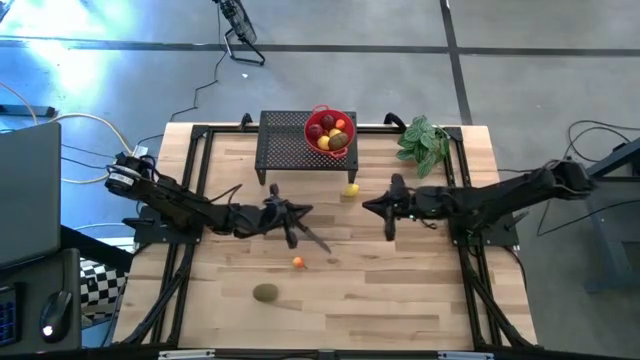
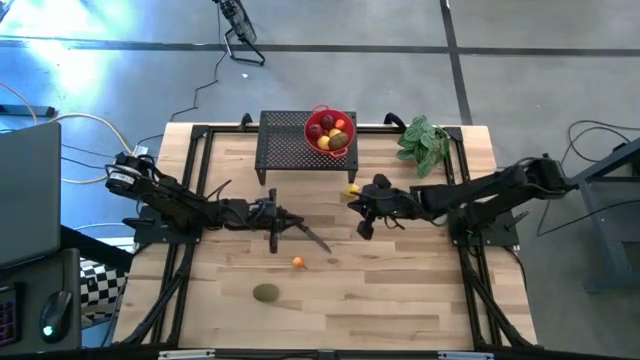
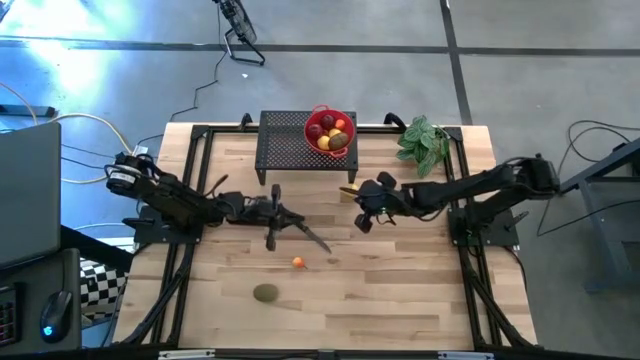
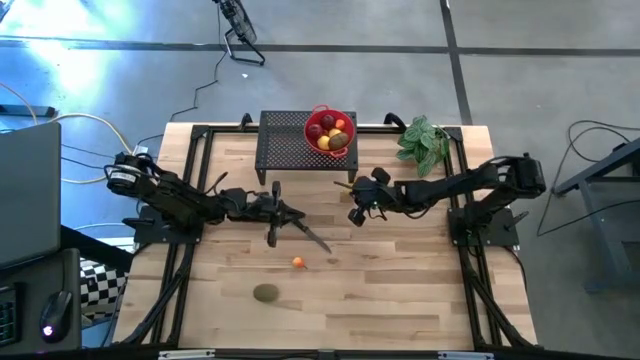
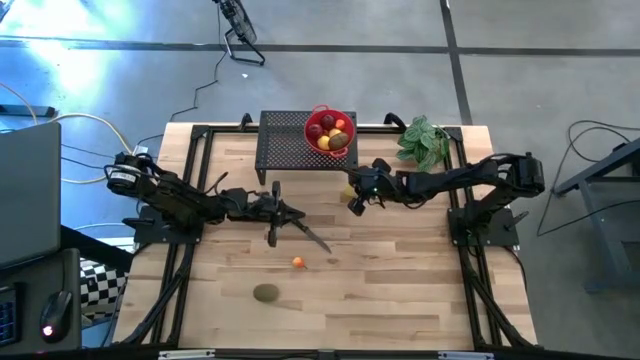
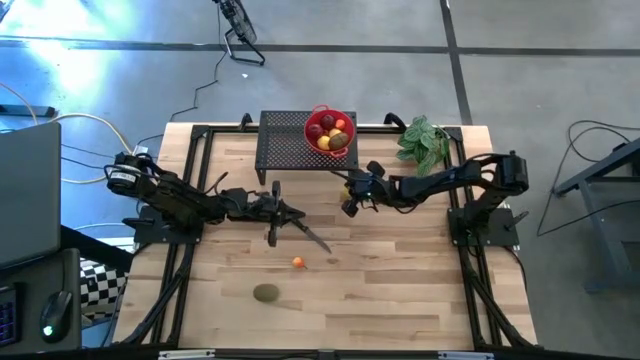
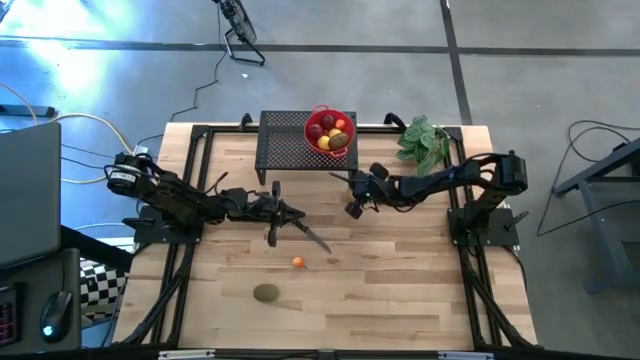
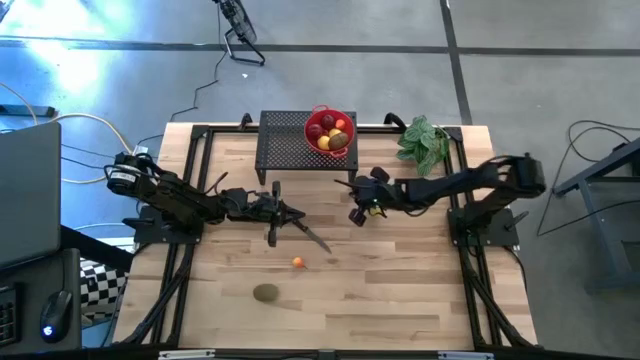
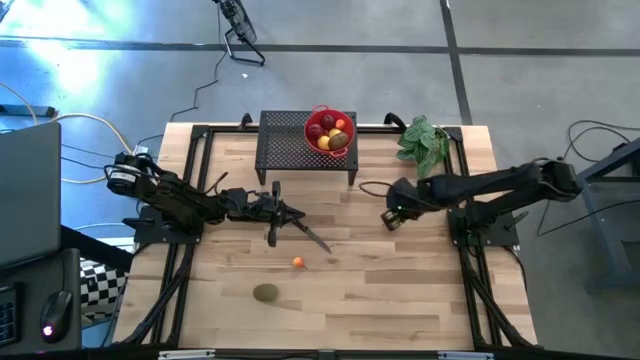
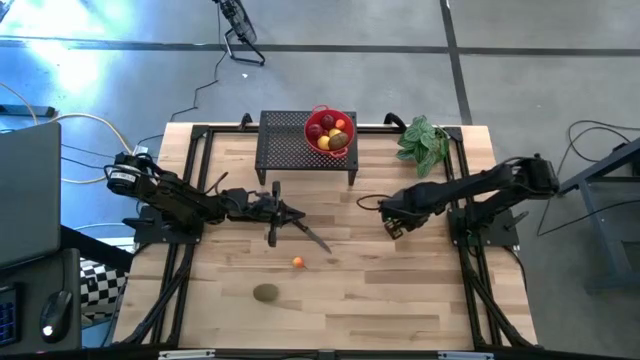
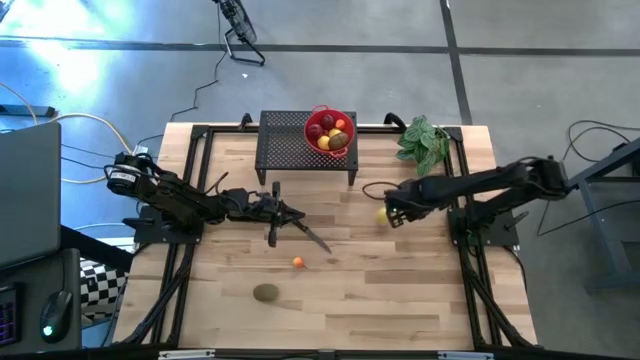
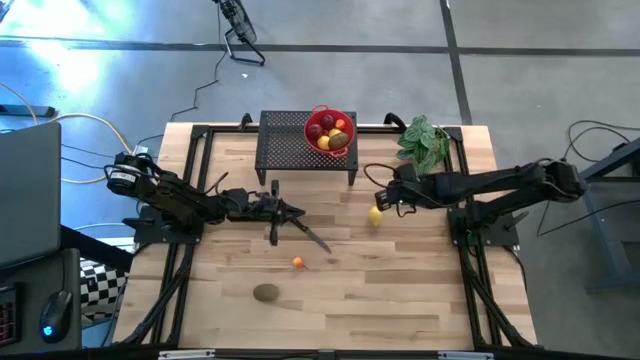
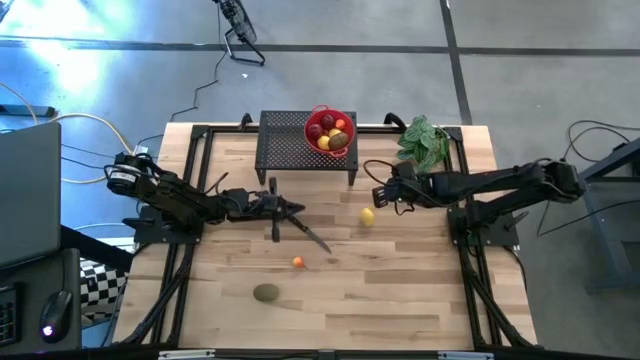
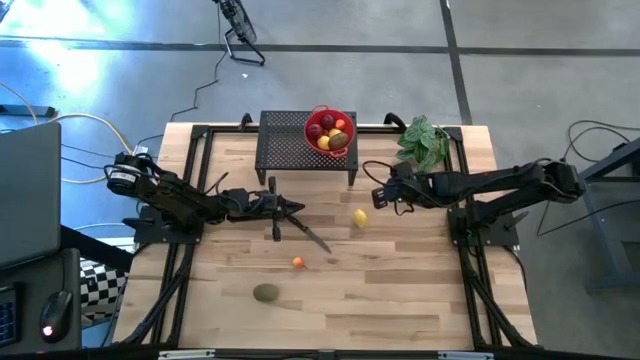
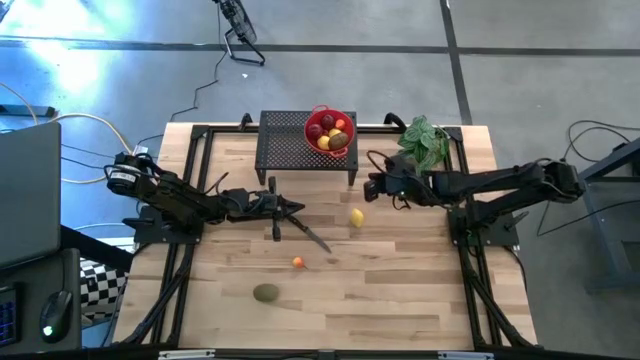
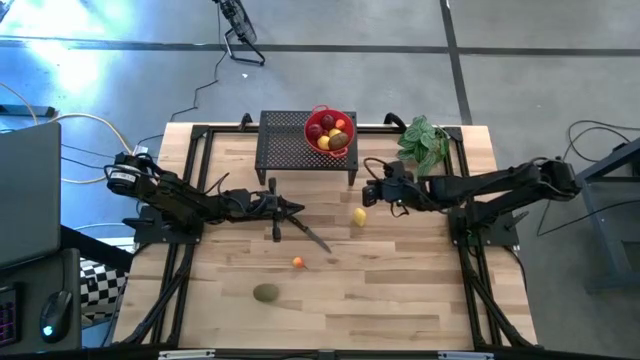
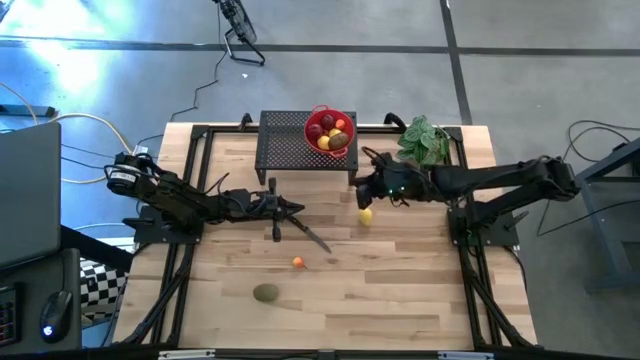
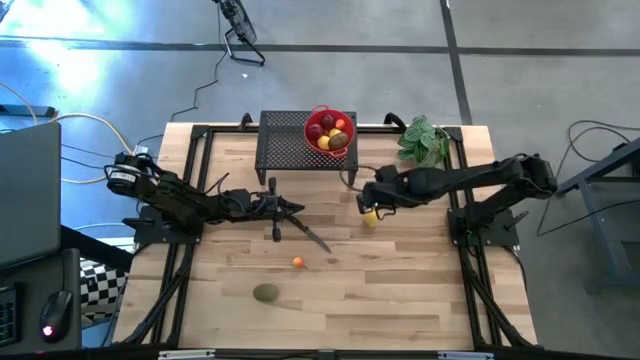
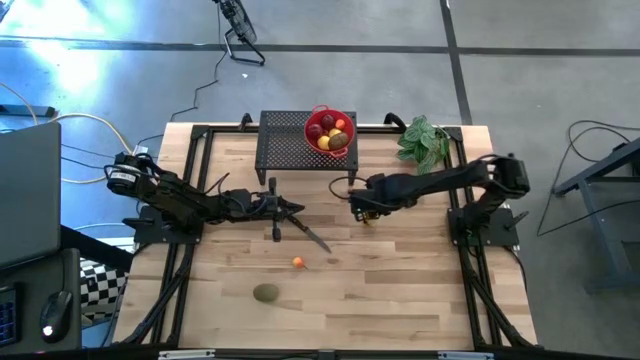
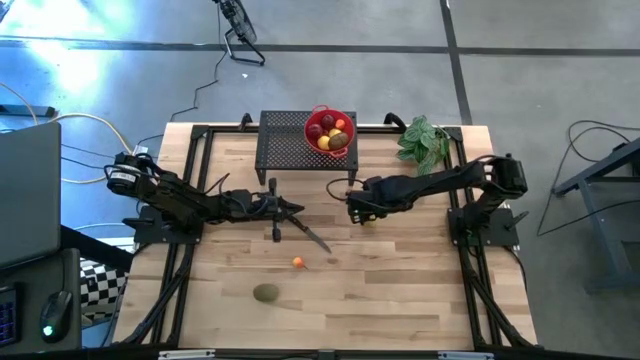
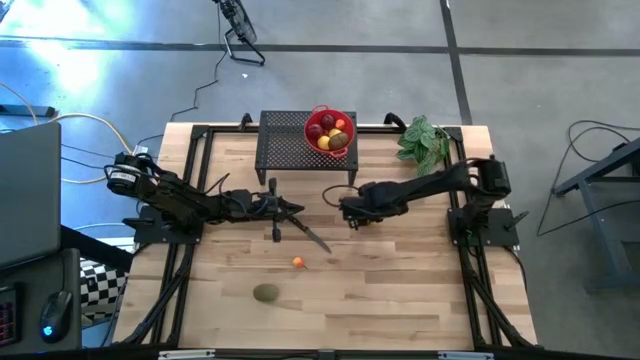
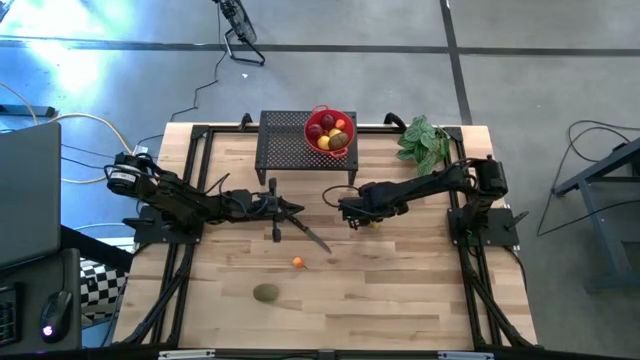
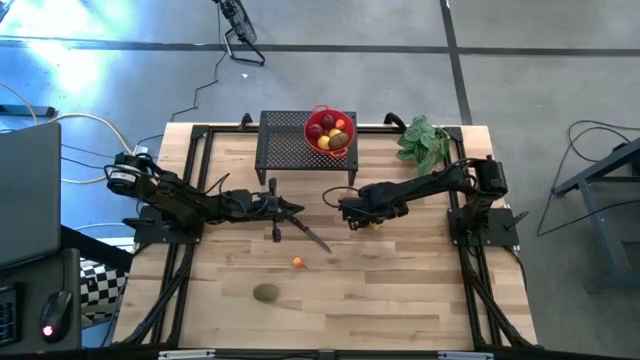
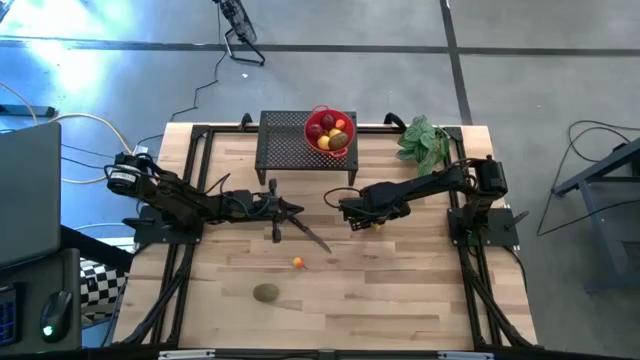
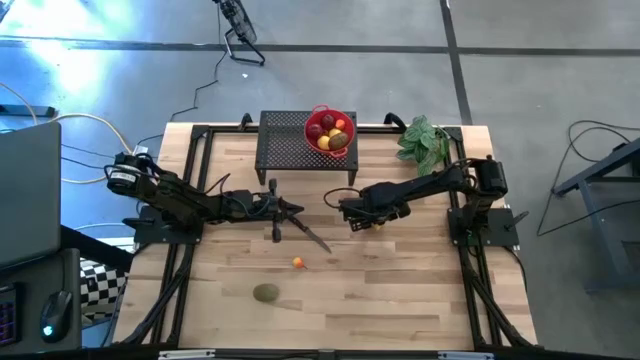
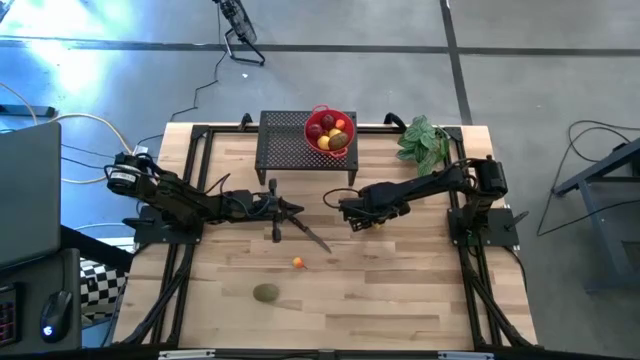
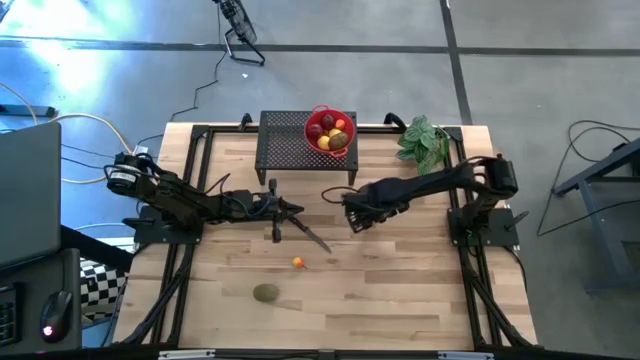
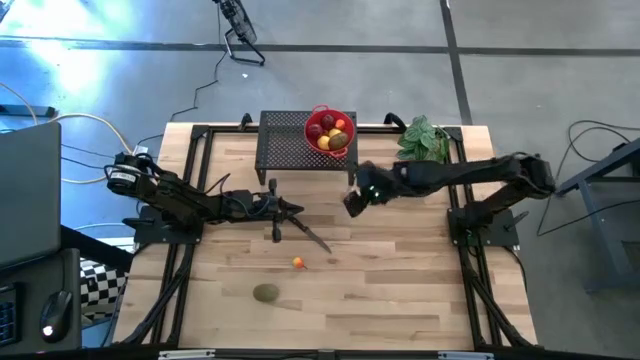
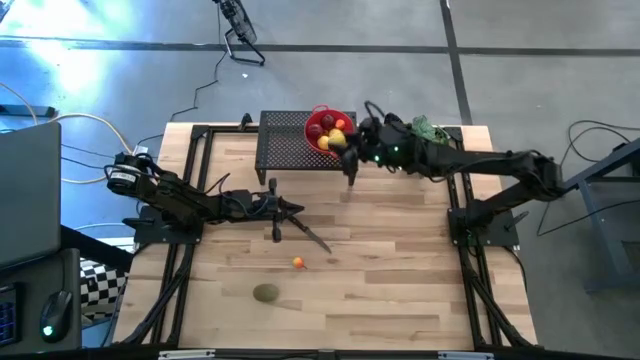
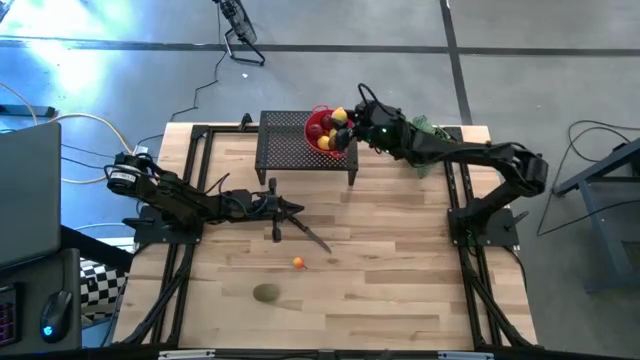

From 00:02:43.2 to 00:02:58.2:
Task: Pick & Place Fruit
Put the lemon into the colander on the shelf

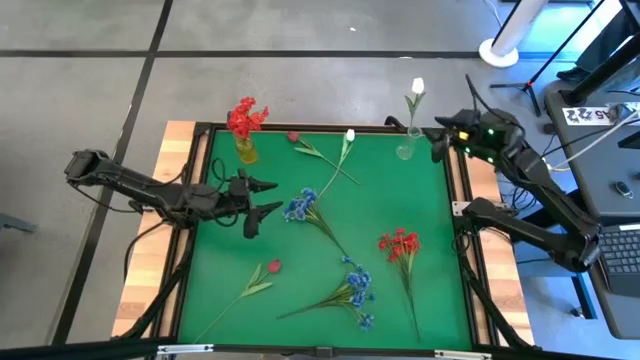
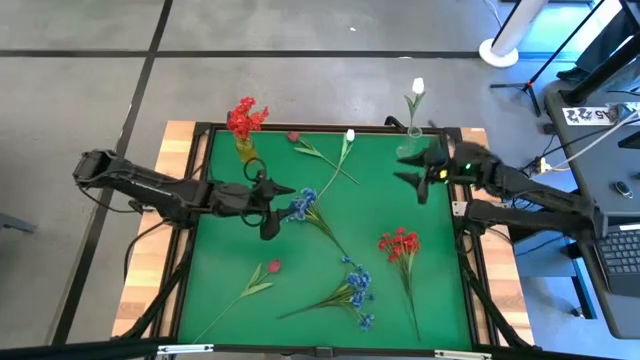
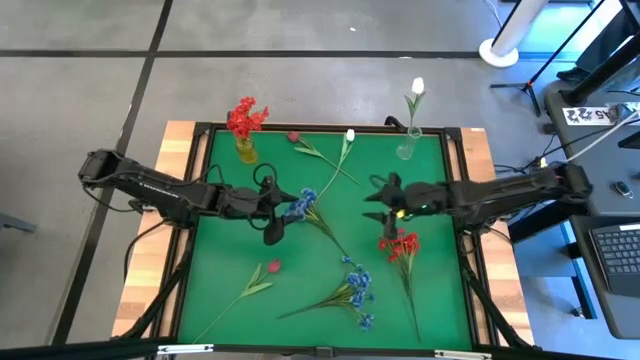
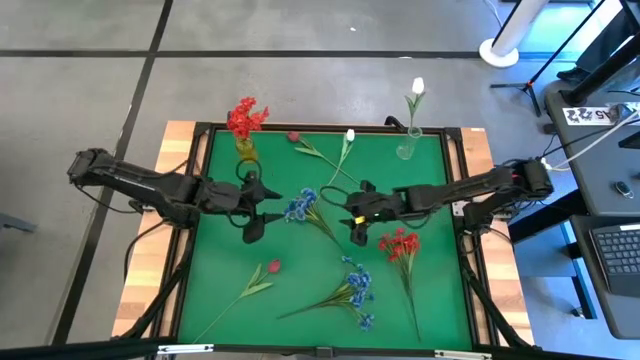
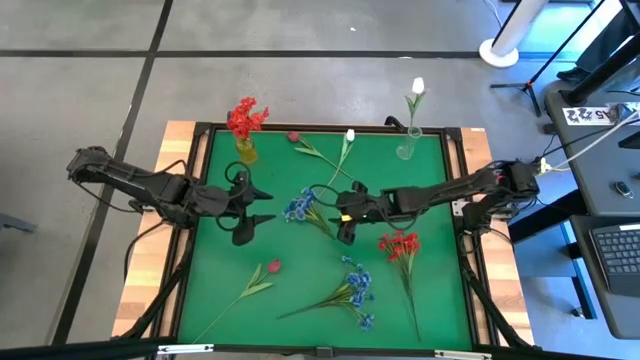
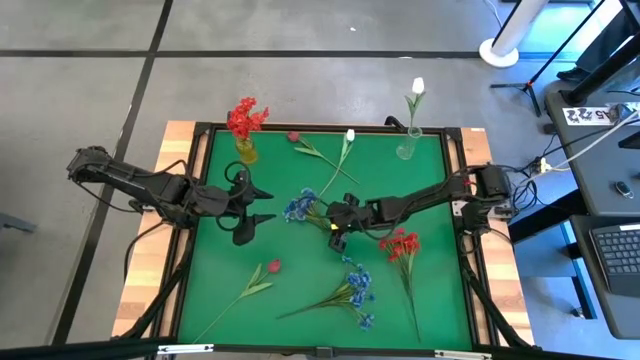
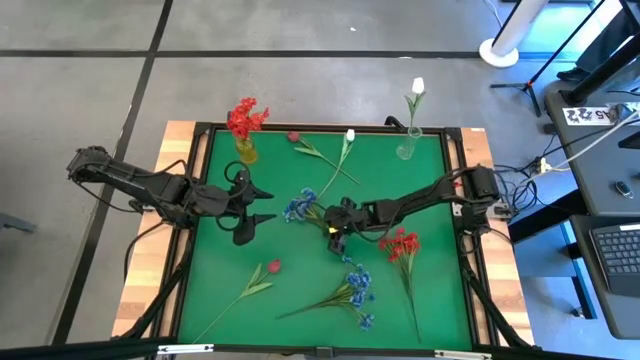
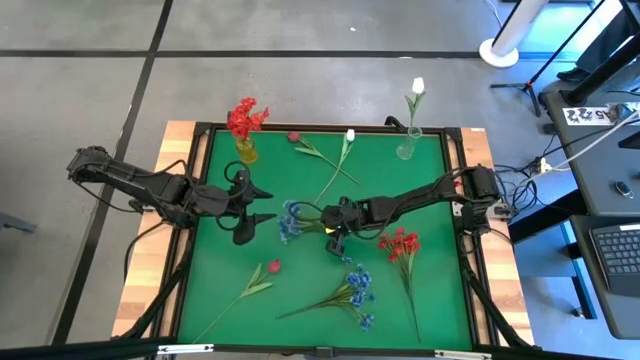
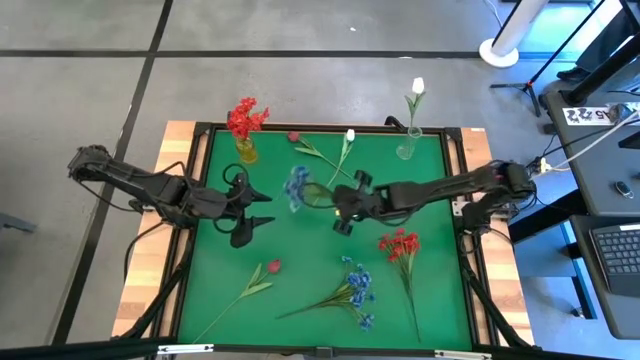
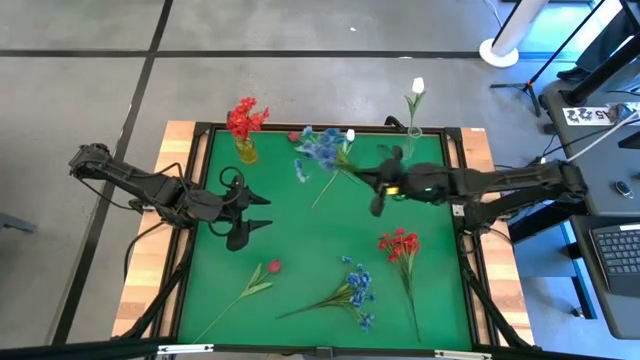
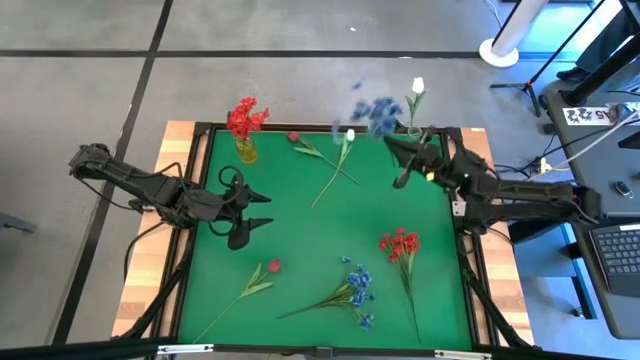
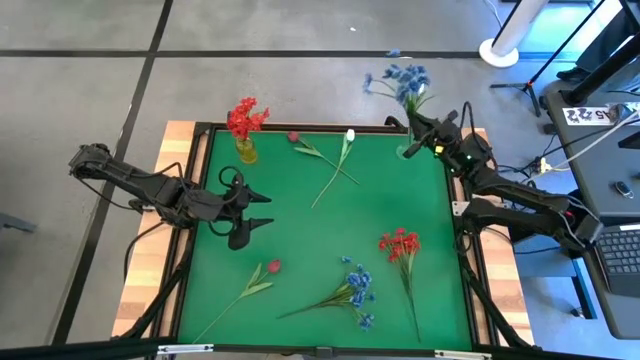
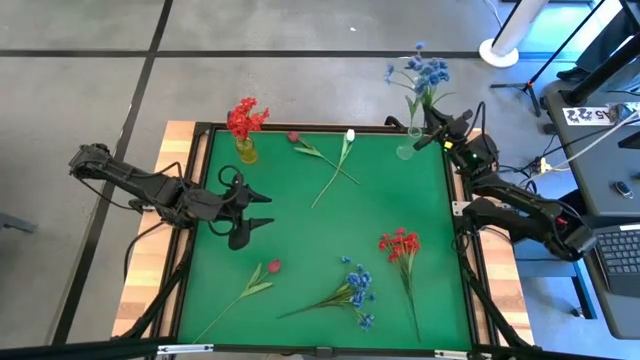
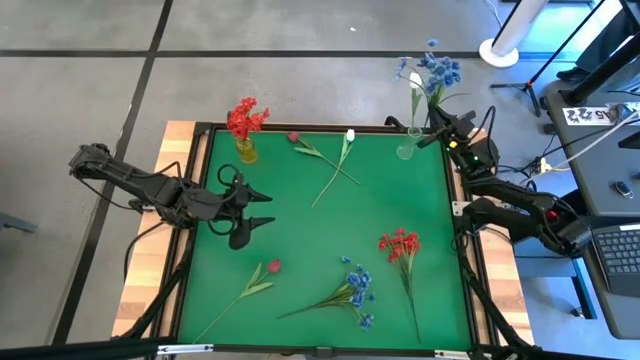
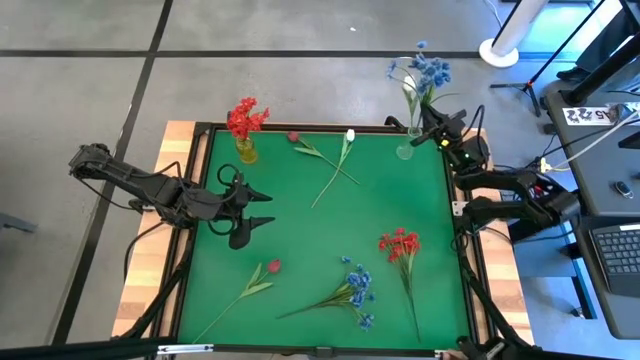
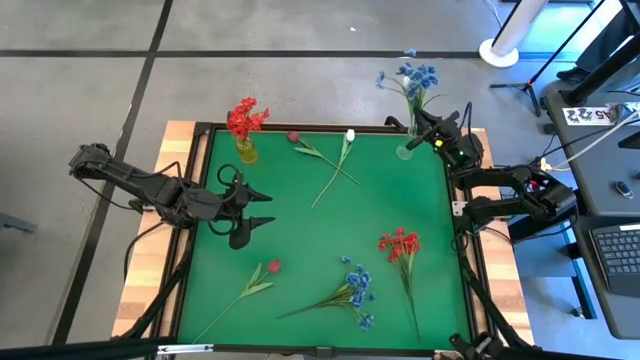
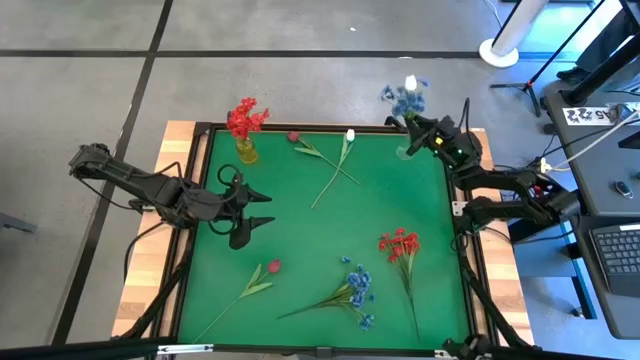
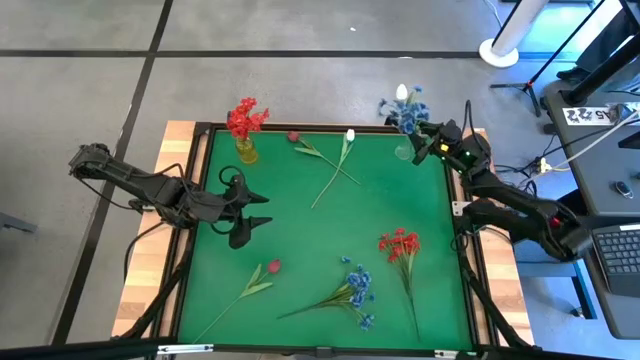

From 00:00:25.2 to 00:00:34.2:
Task: Sort flowers into vase by color
Put the top blue flowers into the transparent vase
